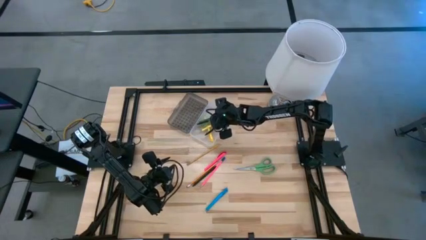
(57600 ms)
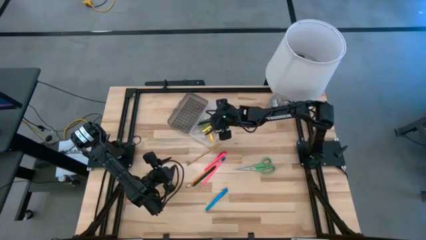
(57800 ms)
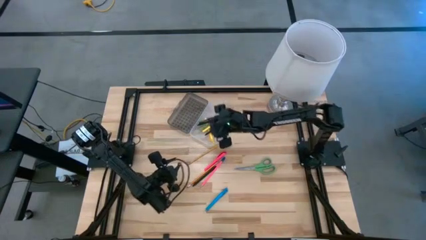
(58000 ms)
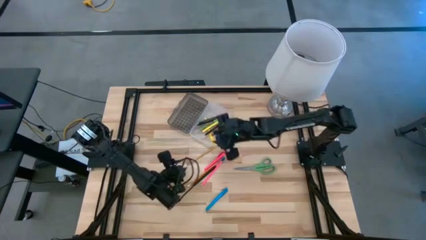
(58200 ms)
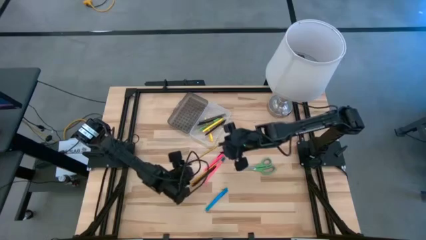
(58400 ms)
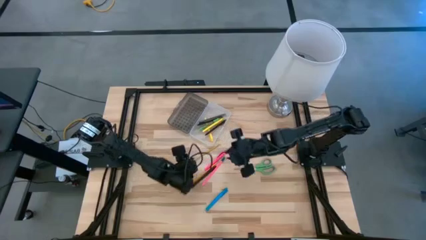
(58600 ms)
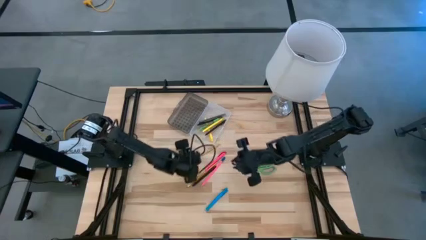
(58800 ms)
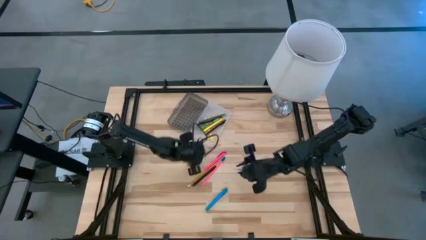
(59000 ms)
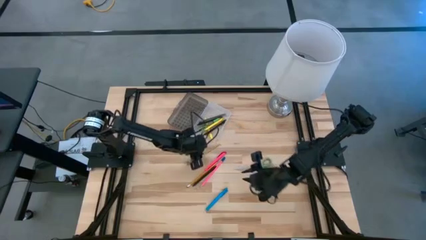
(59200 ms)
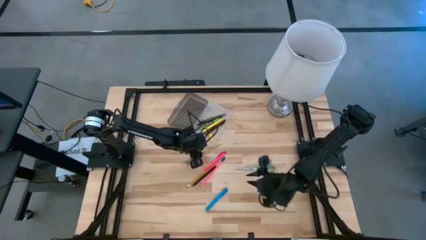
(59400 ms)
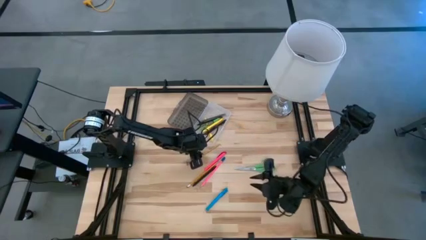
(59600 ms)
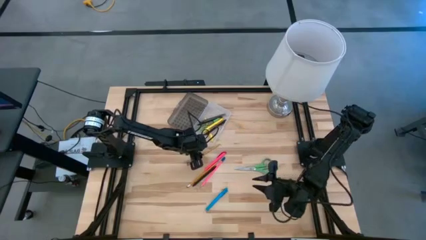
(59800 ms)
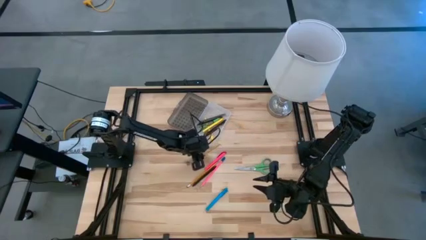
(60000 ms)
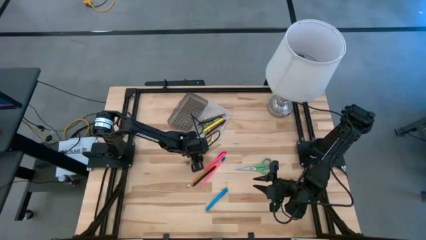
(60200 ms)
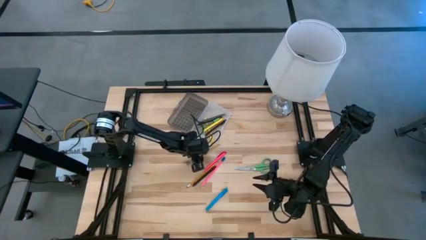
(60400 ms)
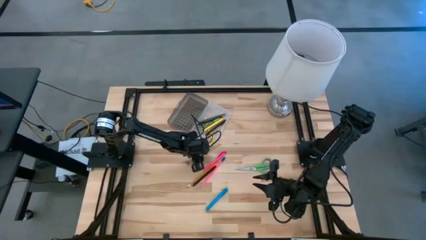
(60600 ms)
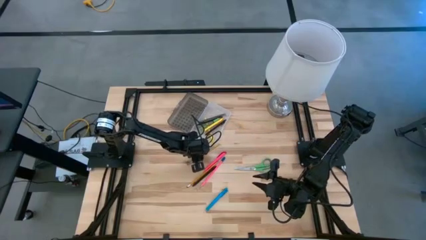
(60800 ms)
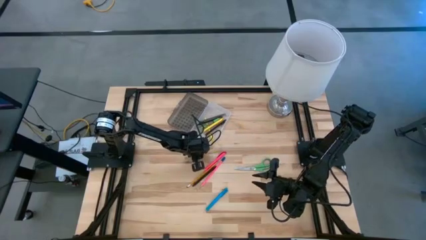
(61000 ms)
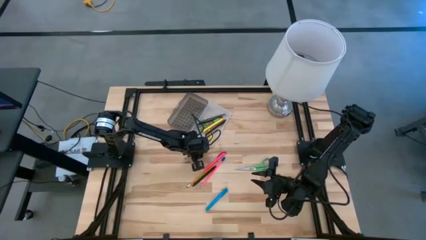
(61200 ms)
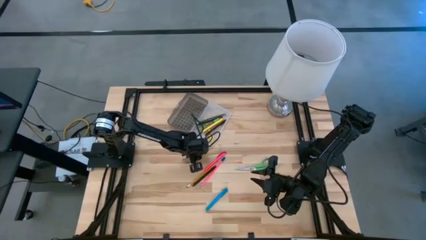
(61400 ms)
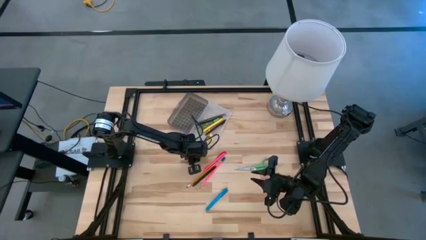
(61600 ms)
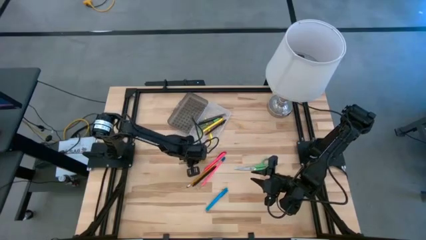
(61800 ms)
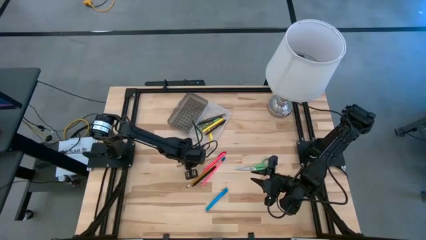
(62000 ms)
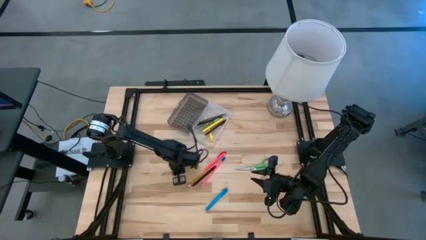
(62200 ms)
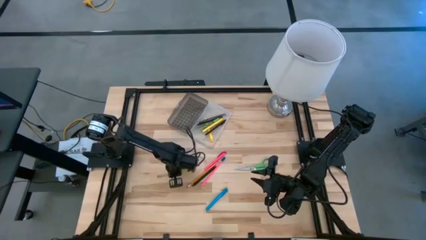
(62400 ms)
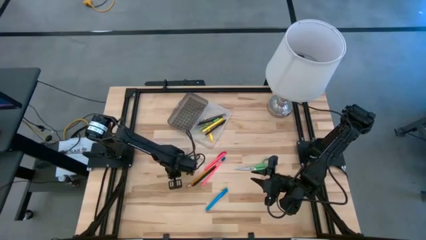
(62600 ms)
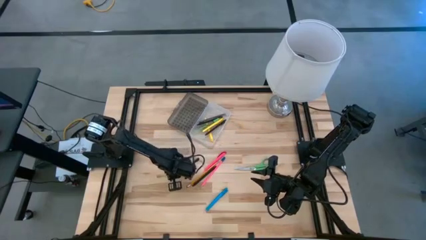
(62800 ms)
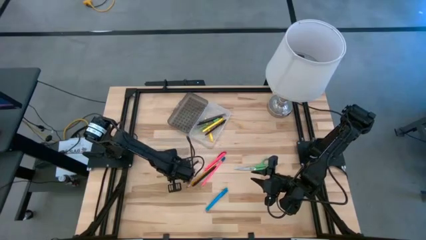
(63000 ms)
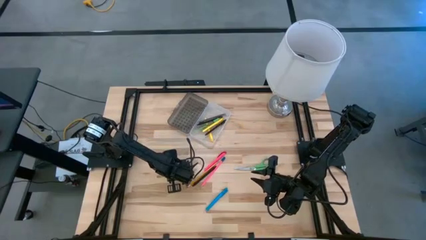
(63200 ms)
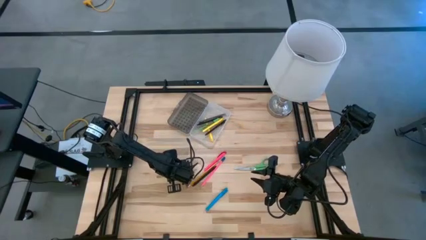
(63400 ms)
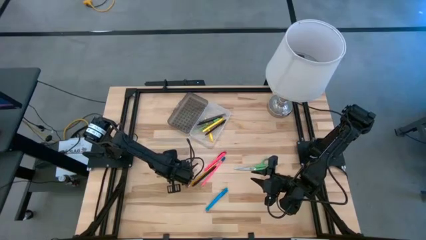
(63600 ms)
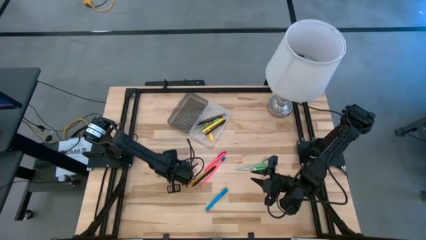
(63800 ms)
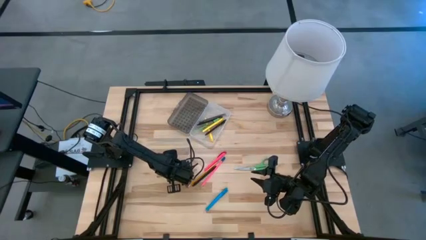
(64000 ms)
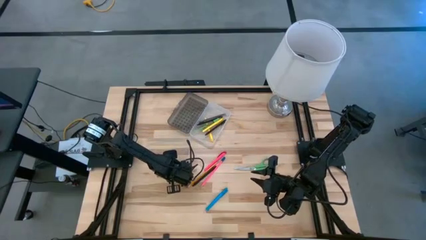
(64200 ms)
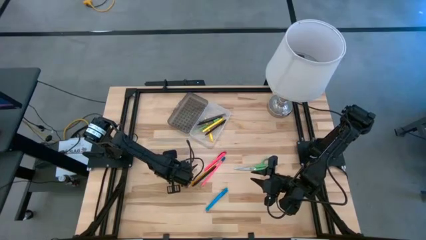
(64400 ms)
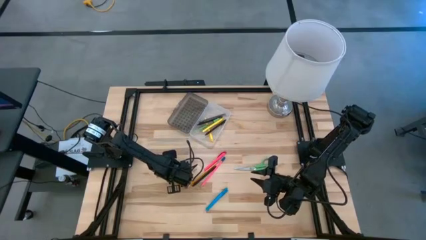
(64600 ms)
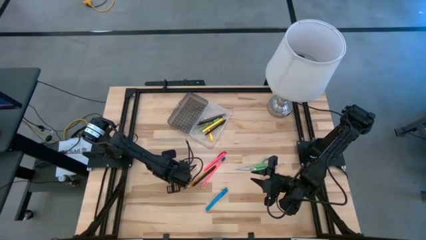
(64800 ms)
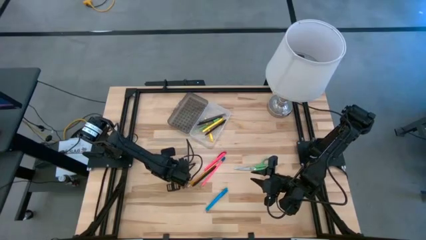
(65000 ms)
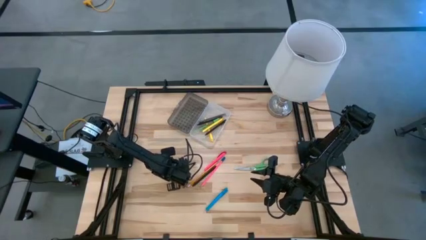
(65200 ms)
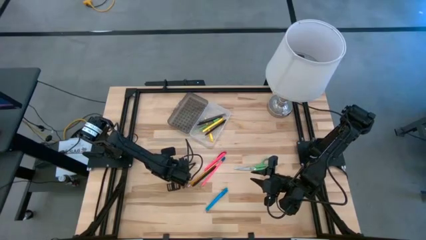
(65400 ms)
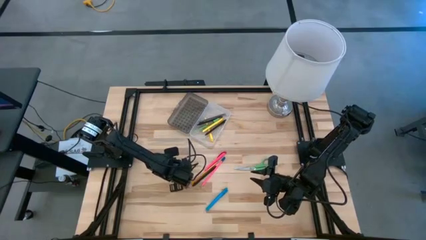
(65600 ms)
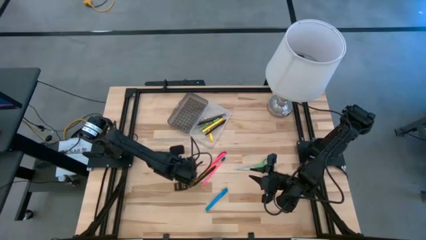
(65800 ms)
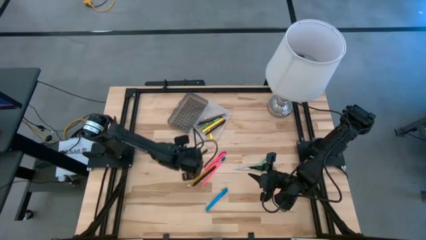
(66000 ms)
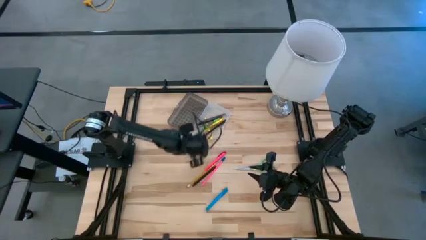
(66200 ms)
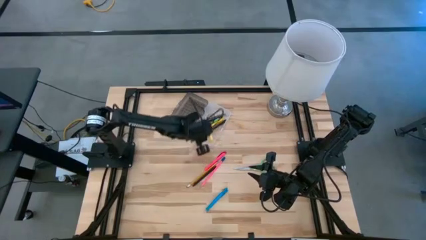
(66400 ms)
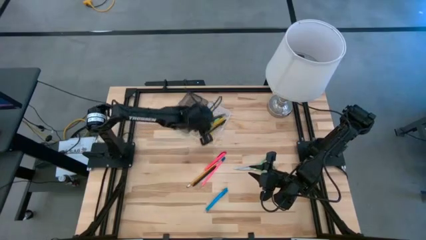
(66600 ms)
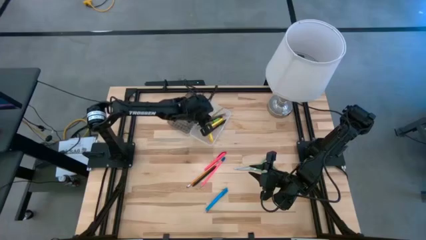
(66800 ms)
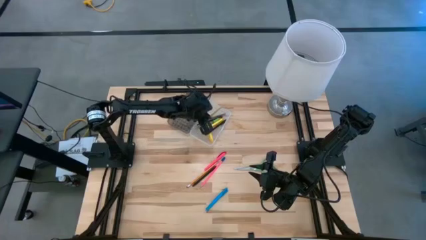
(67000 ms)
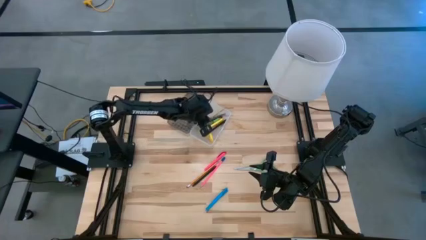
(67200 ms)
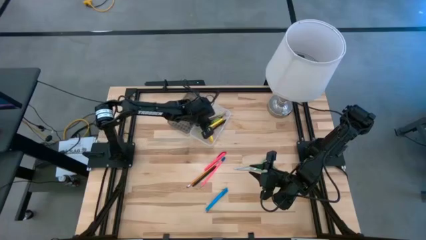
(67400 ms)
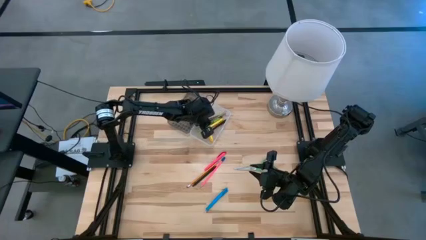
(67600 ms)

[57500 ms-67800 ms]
Task: Pick & place school supplies into a supply box
Put the yellow pencil into the supply box

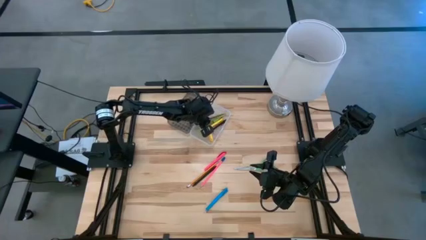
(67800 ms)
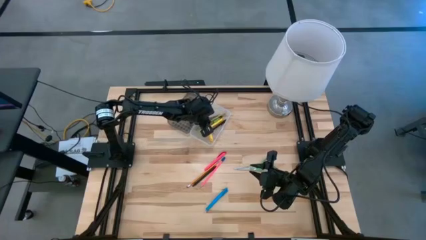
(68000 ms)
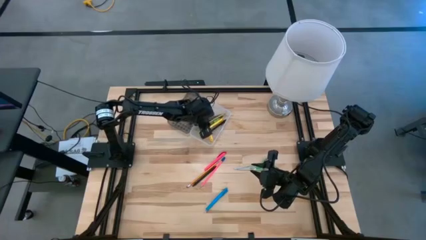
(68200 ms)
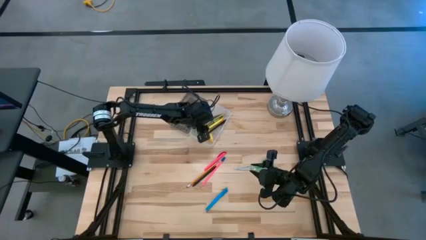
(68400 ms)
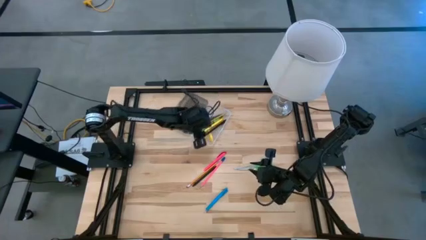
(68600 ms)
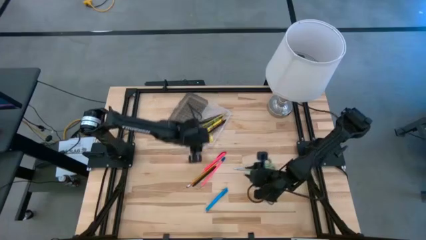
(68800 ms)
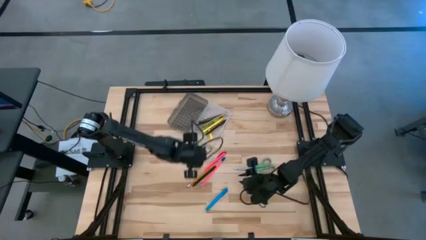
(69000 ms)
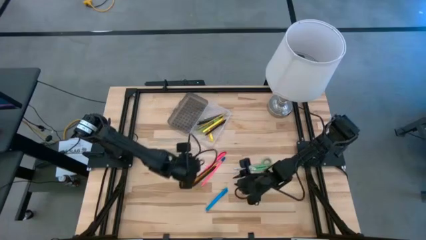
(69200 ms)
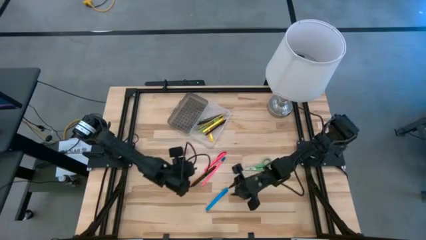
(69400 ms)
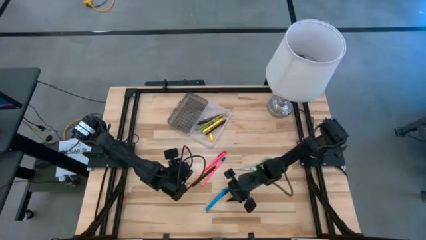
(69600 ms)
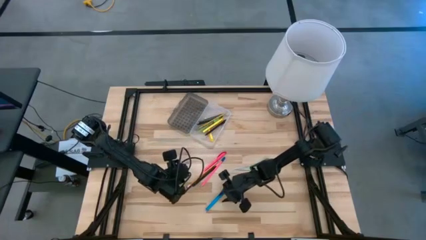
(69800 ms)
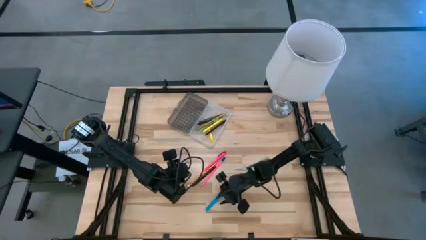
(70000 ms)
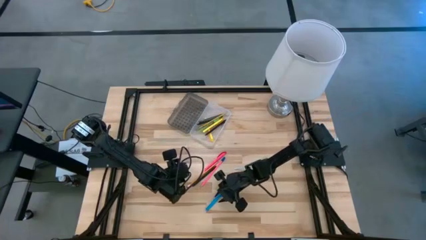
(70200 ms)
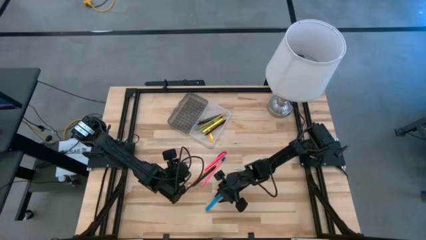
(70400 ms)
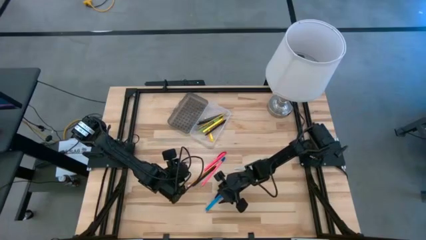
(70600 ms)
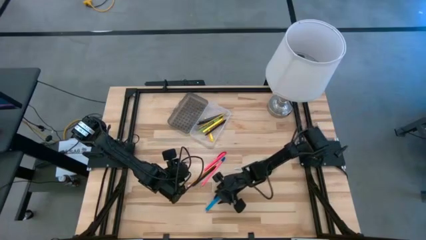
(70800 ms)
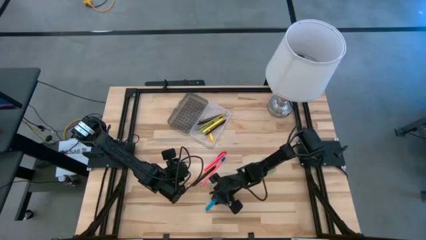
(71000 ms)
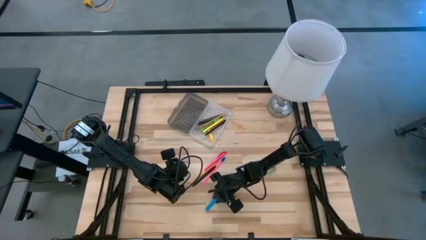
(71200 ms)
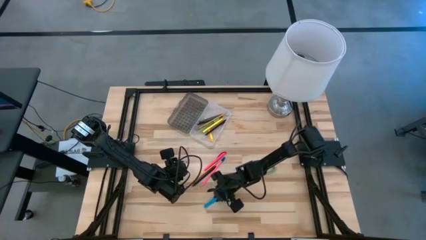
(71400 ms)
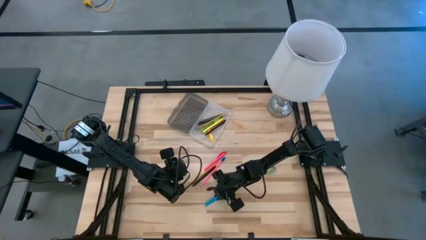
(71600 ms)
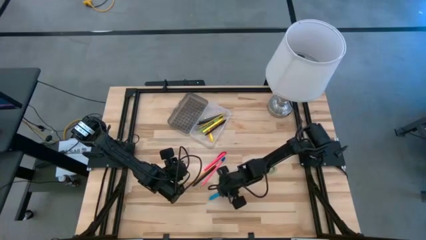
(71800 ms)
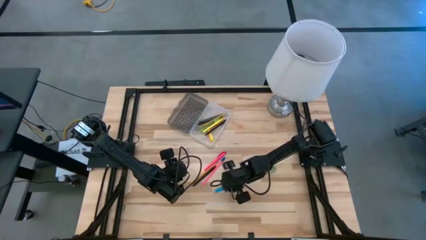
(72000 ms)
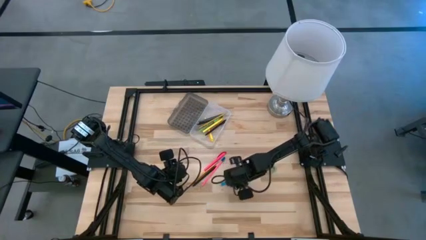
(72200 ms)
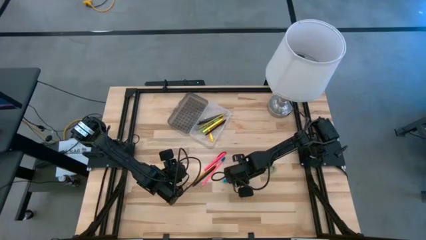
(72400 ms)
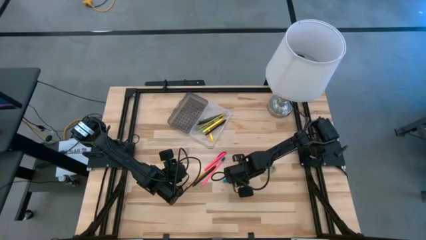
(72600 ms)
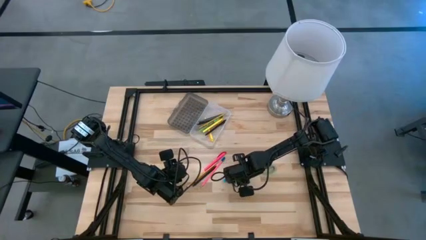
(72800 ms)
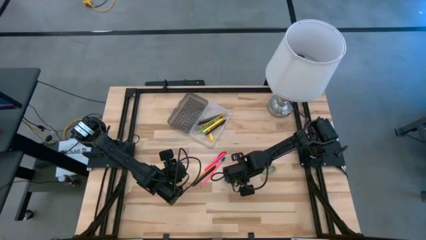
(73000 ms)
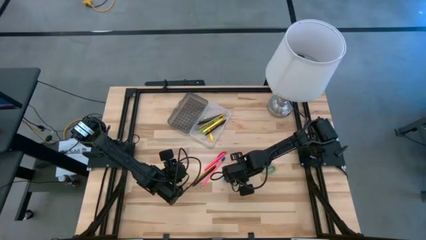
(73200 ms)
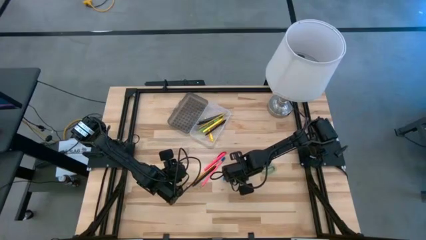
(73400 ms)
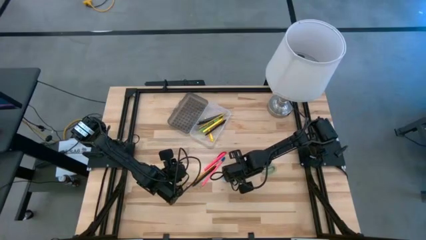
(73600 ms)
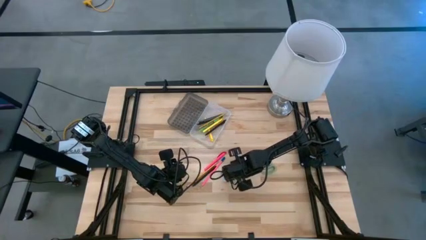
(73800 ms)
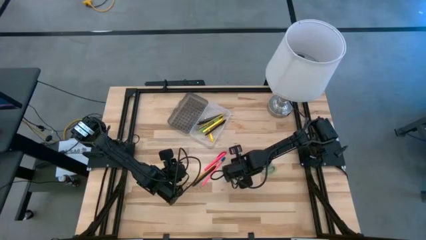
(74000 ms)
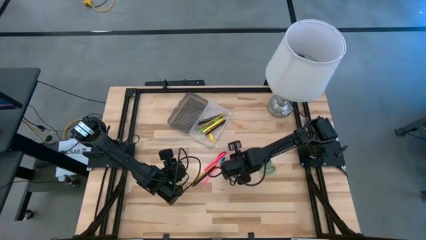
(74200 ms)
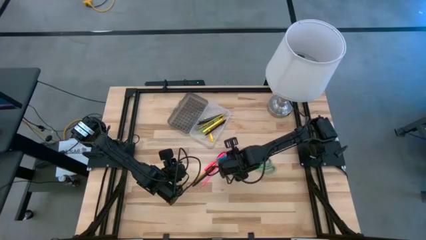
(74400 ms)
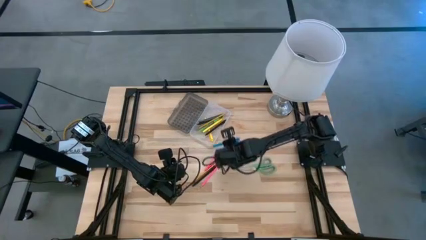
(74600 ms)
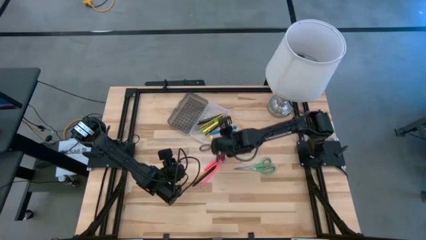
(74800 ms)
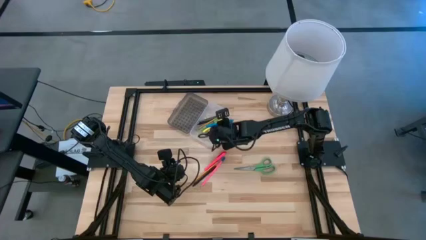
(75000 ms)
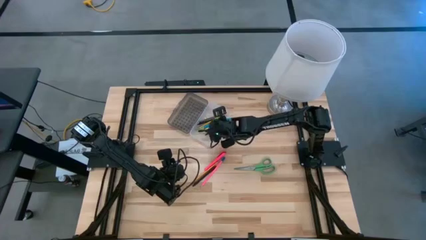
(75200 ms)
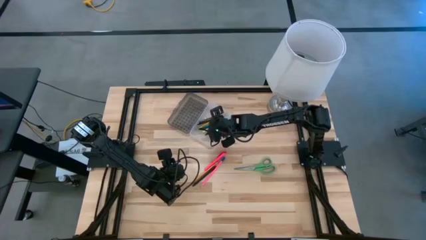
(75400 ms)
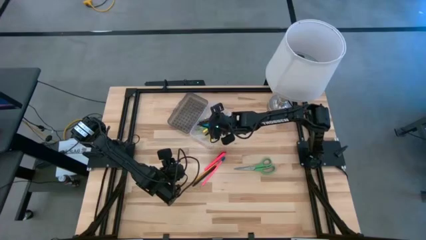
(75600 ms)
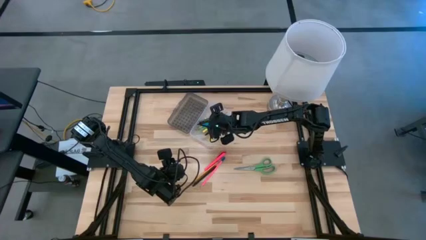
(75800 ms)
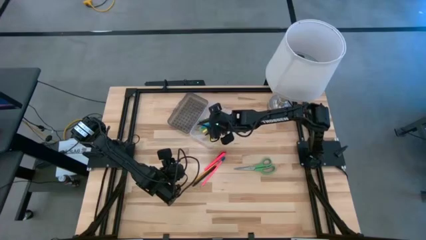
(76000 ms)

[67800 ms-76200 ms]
Put the blue pen into the supply box
